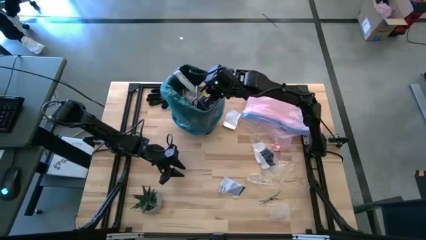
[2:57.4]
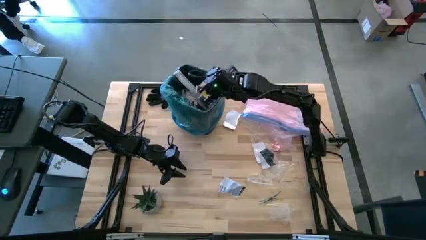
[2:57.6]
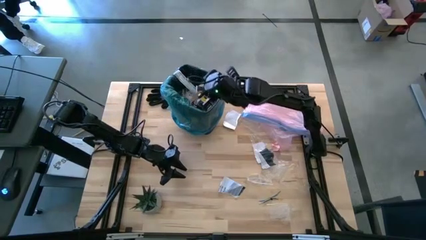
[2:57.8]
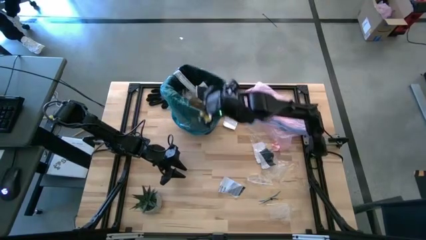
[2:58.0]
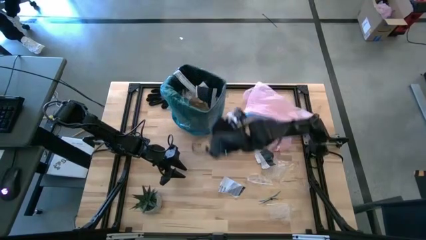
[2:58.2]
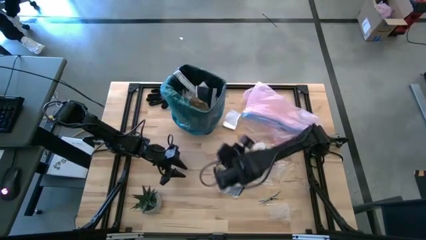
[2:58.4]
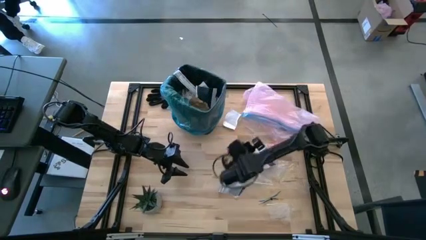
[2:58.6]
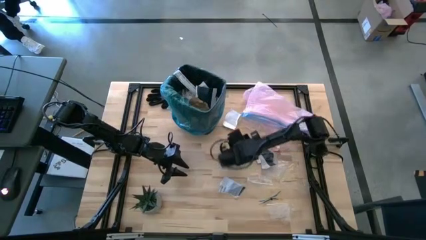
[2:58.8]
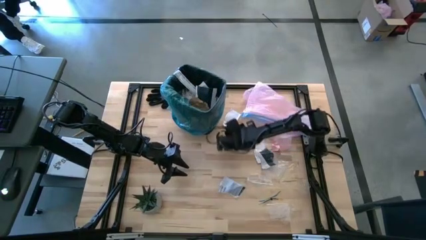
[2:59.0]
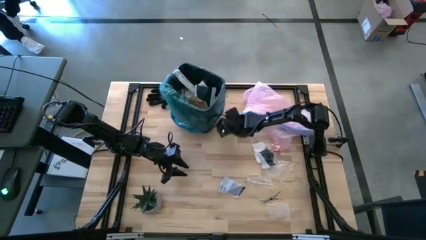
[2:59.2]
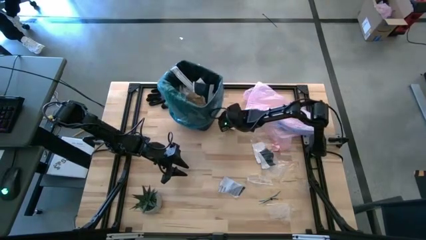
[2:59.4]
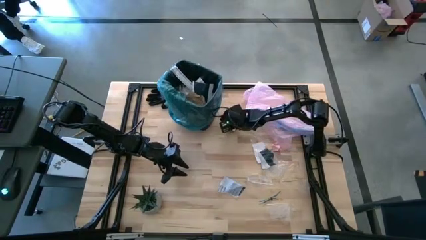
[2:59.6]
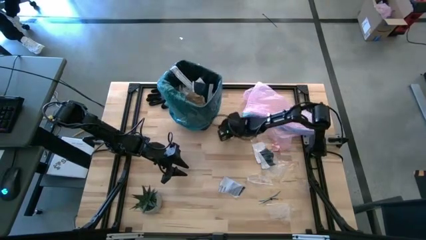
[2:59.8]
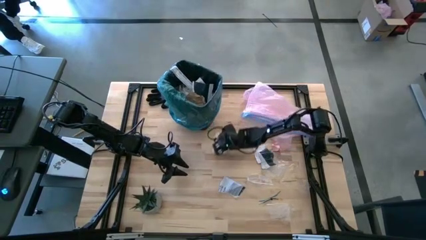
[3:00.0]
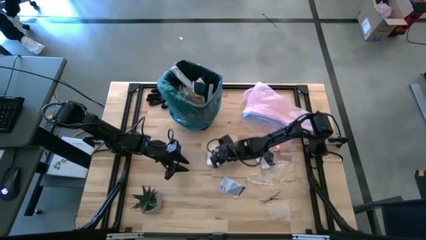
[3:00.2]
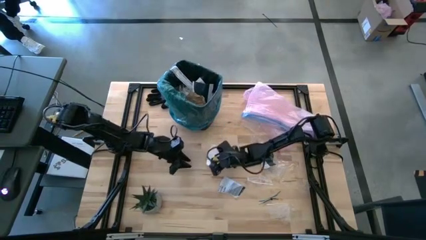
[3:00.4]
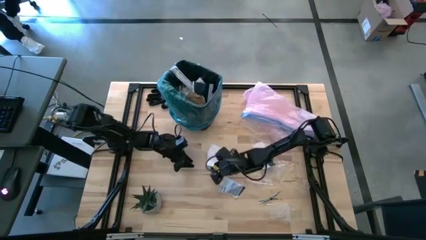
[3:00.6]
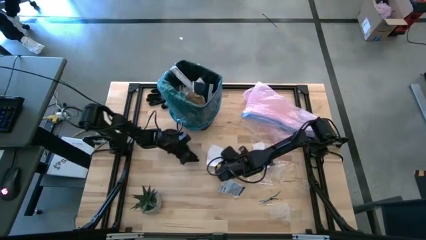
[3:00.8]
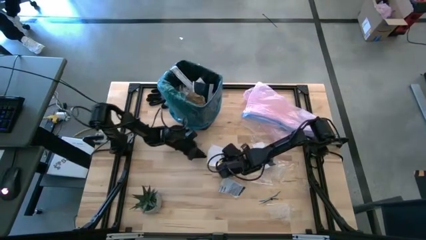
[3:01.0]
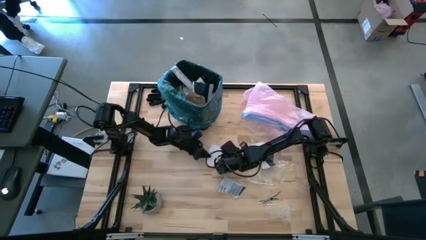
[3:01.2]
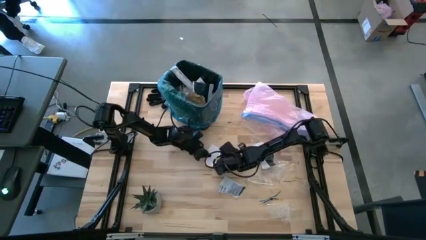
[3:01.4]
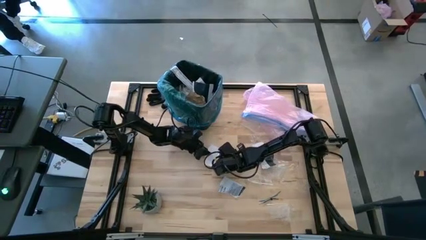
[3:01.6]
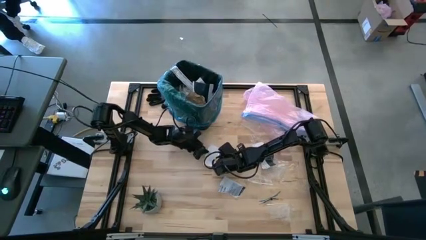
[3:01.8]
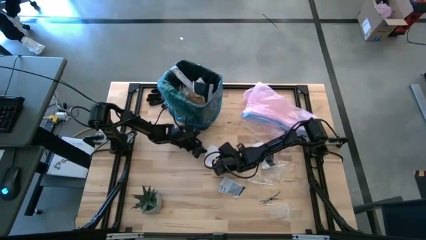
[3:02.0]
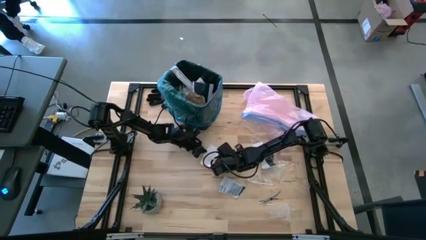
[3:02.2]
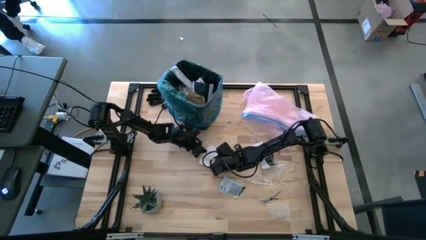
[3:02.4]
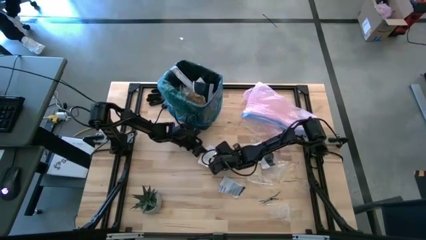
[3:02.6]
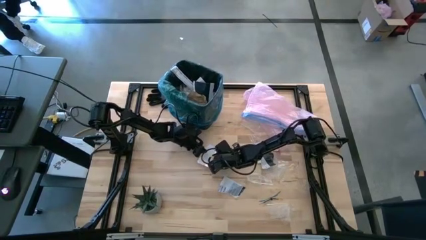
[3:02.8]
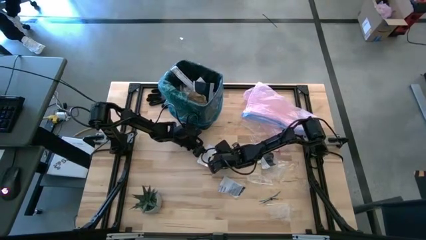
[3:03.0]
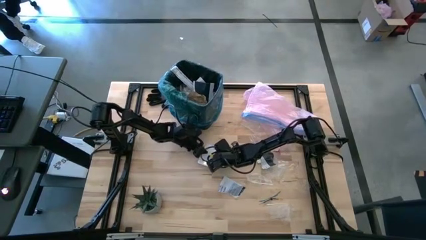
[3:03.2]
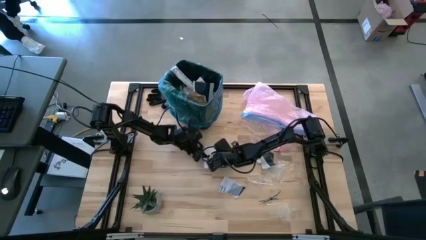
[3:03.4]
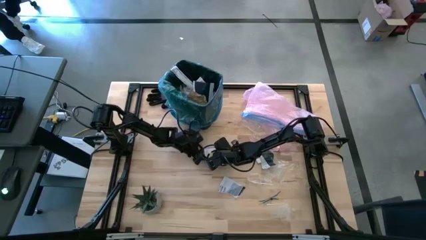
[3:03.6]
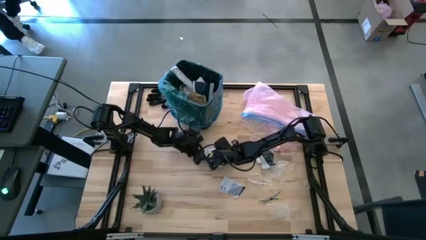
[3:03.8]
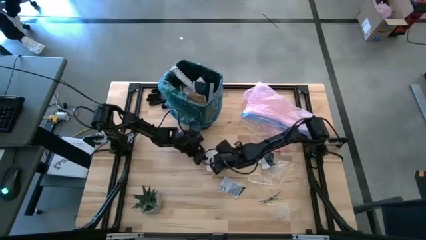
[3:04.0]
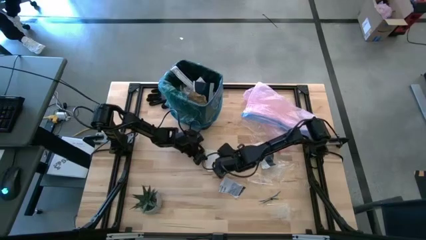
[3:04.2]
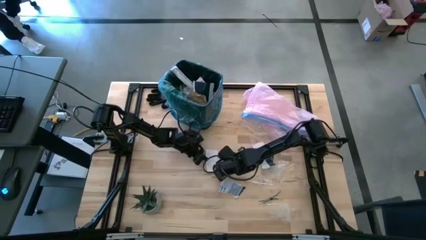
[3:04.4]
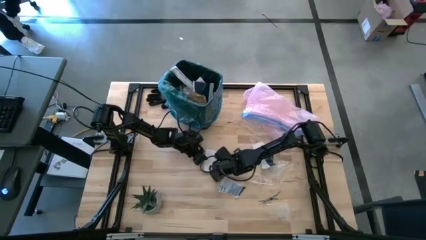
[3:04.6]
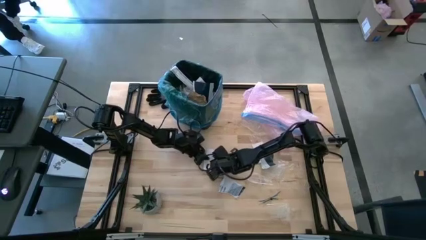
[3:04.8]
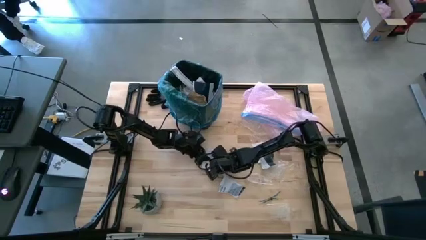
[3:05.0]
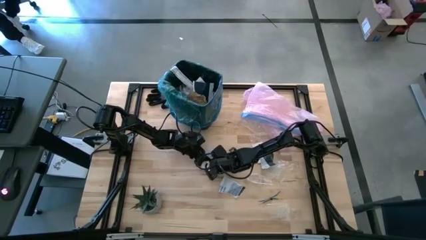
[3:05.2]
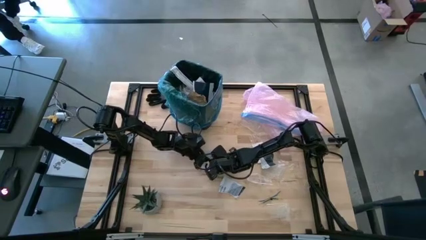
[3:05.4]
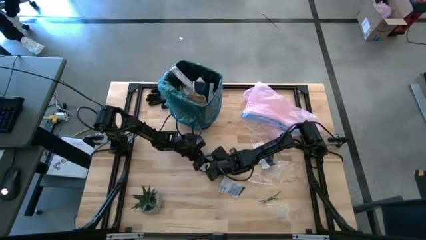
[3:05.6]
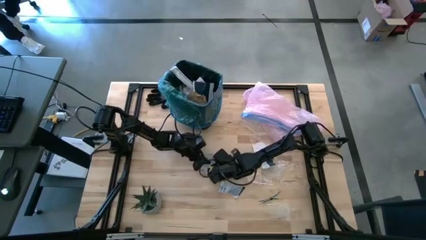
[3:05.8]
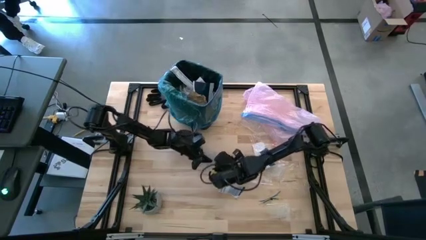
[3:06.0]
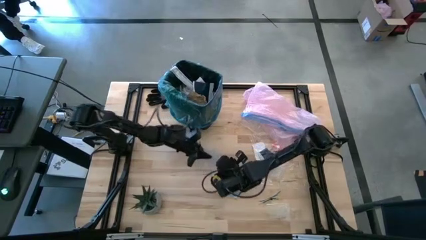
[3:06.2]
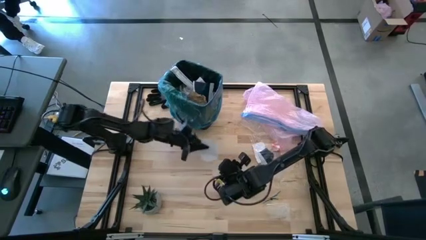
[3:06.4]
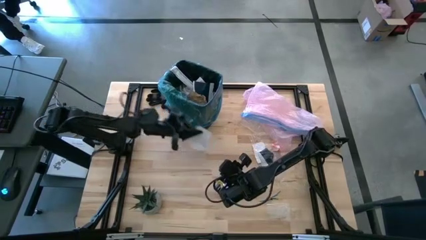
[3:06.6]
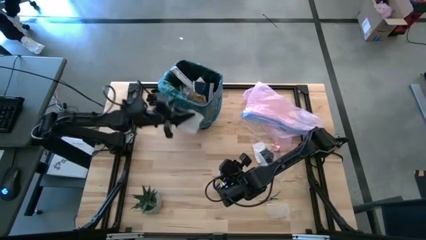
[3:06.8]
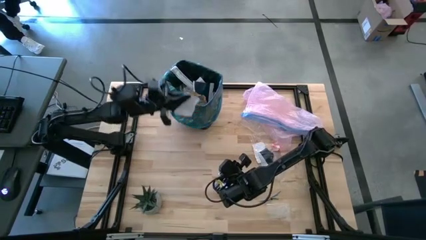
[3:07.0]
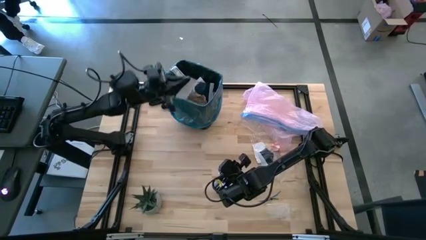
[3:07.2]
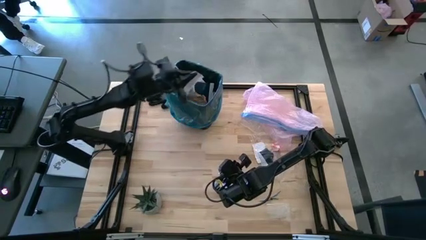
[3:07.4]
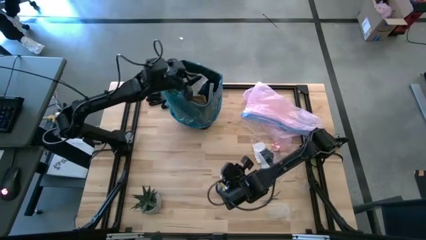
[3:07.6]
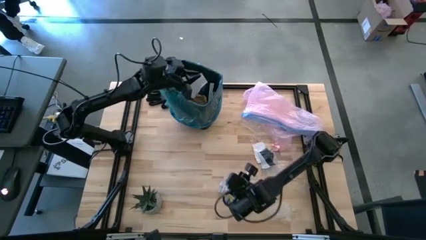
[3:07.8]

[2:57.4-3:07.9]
Task: place trash/remove bag and relplace
Put the white paper into the trash bin

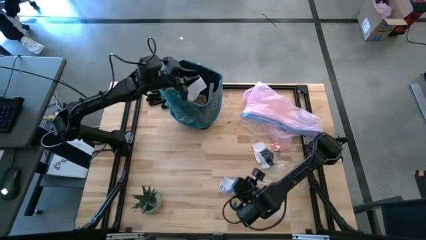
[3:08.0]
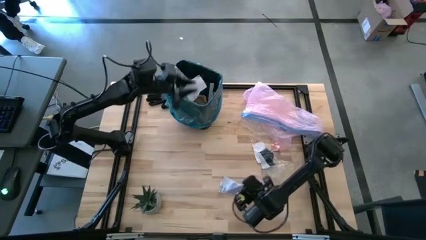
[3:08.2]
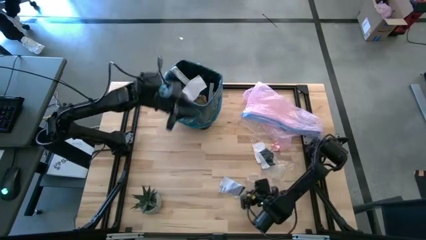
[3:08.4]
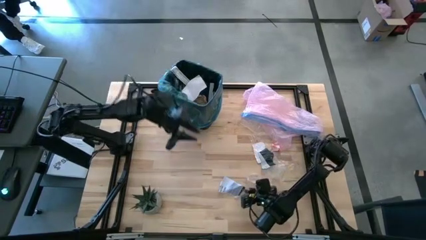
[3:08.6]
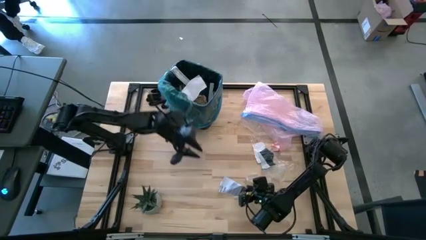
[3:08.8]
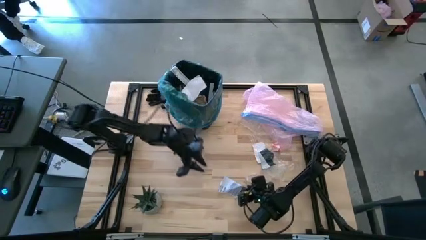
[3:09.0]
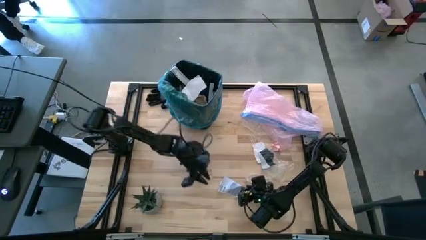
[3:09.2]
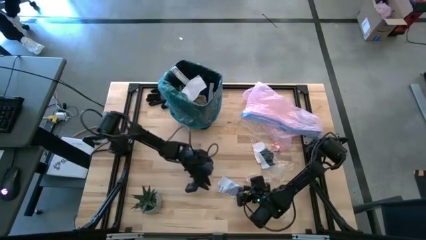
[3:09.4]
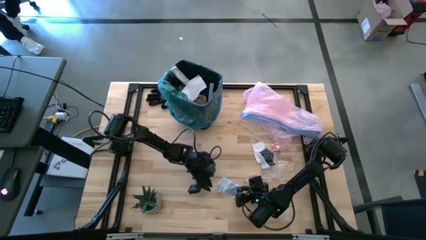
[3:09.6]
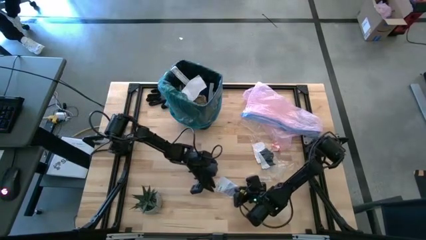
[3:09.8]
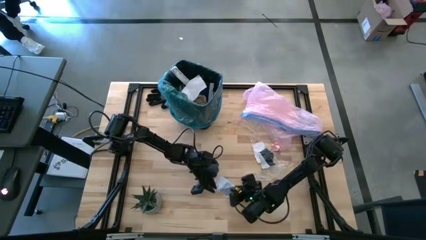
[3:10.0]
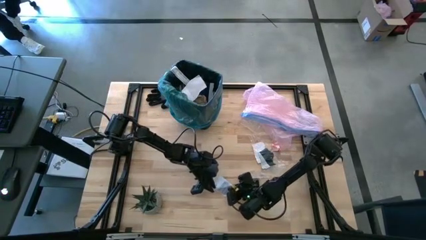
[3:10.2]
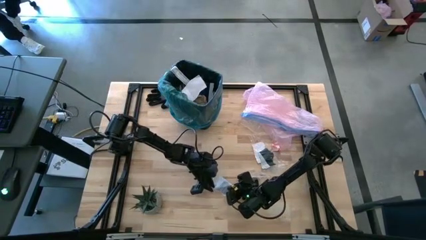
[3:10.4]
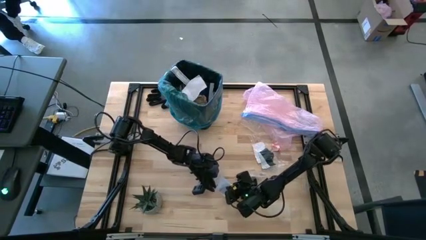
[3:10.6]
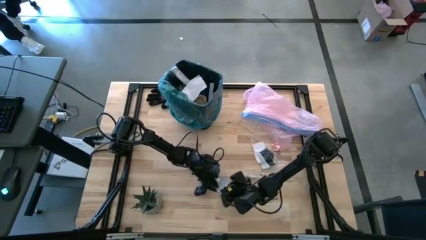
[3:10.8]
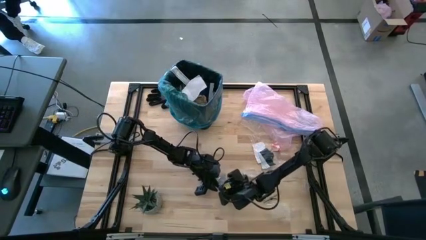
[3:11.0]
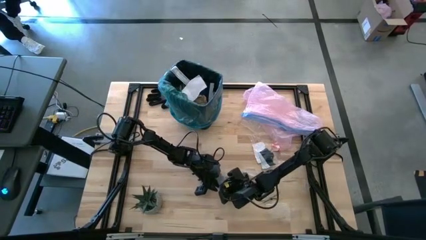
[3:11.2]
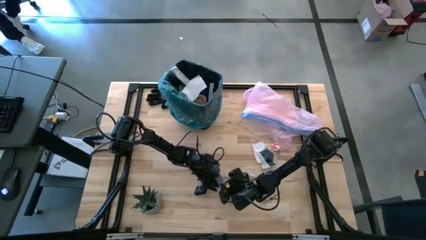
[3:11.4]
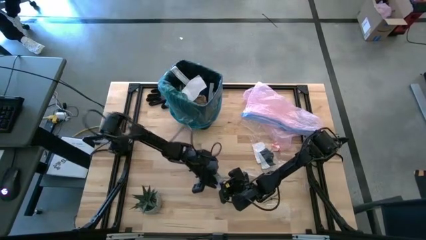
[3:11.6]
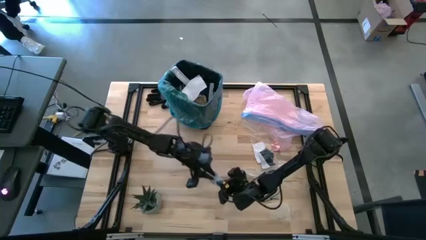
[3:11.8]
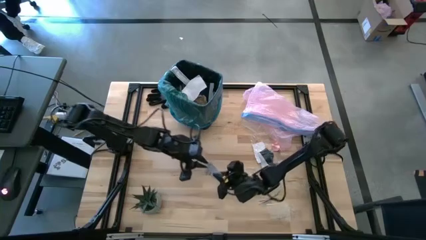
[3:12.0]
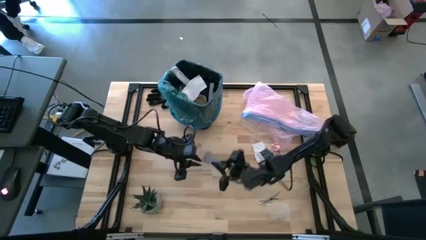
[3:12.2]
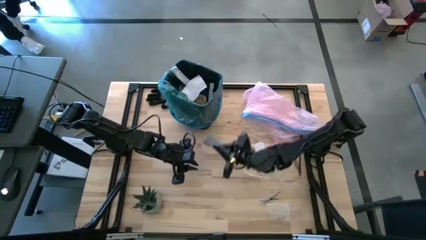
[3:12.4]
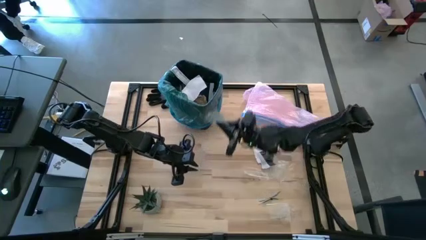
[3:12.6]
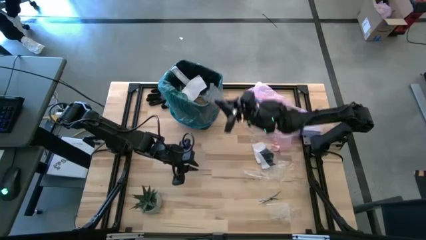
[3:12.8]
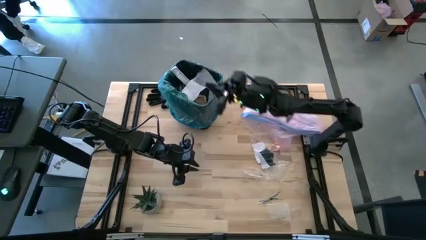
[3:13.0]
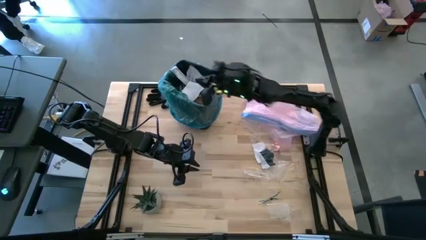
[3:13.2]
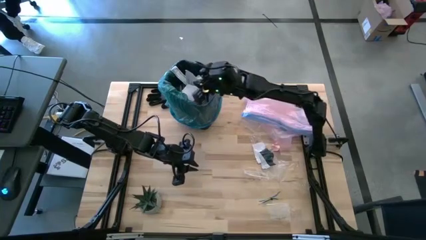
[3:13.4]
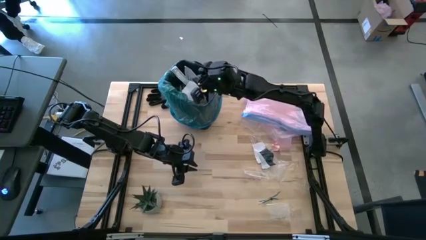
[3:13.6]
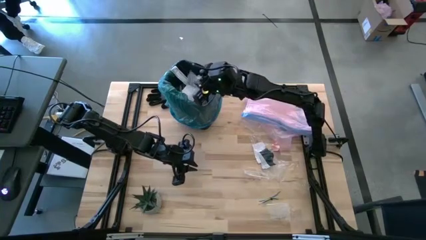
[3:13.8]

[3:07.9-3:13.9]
Put the printed paper into the trash bin

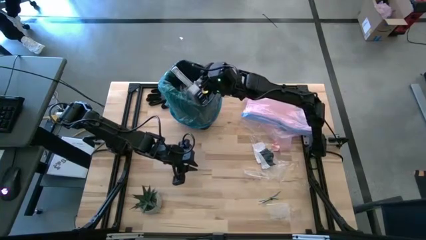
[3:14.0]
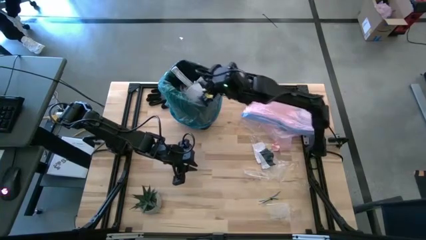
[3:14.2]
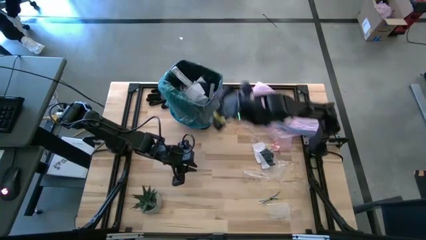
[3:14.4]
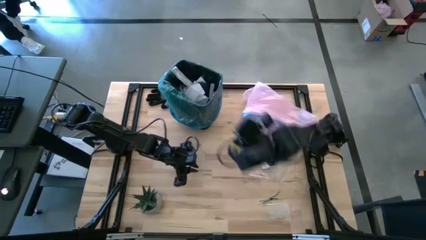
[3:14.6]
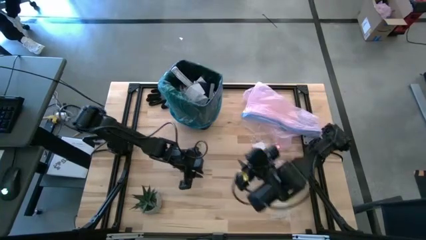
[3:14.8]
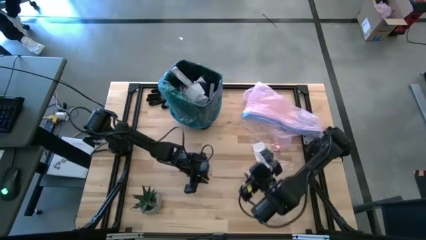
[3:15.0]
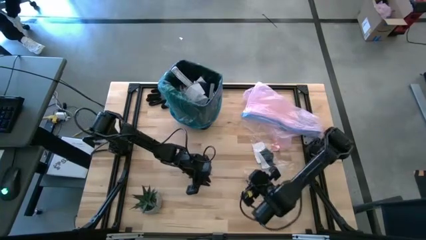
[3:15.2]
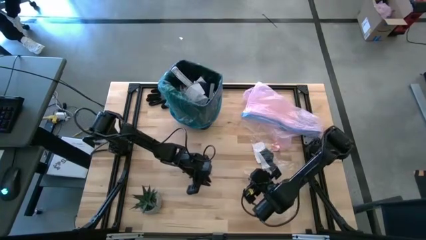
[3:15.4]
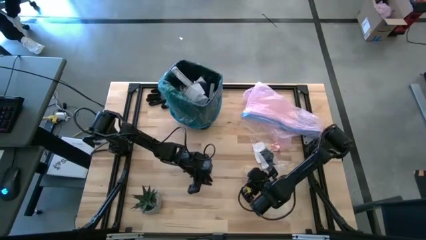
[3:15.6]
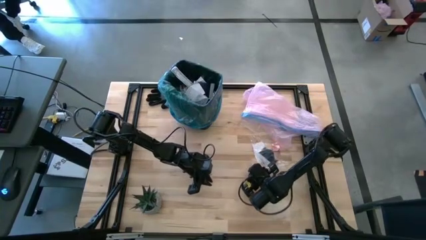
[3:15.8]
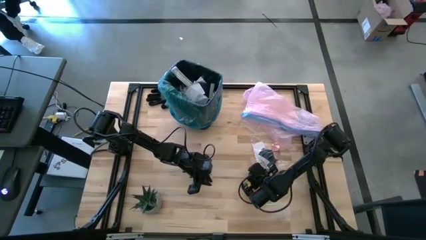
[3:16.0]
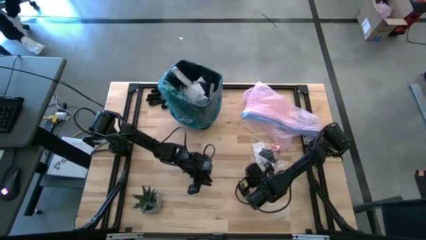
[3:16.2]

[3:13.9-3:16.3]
Put the clear plastic into the trash bin
